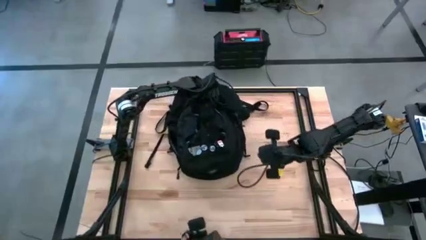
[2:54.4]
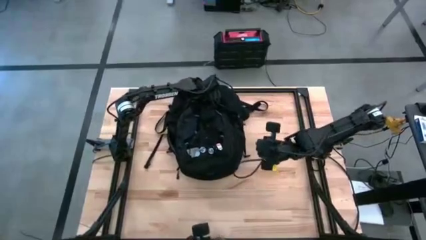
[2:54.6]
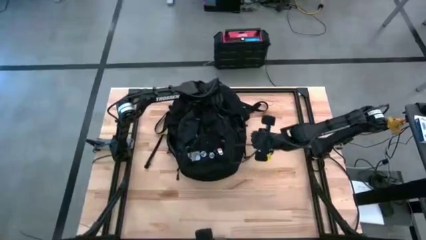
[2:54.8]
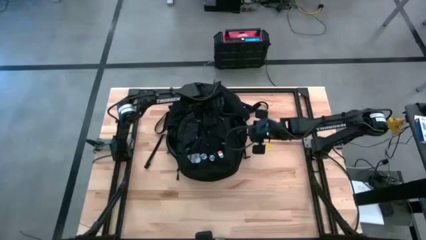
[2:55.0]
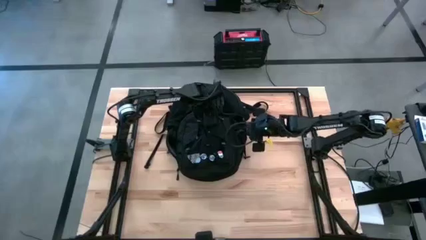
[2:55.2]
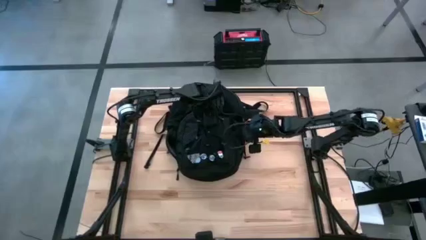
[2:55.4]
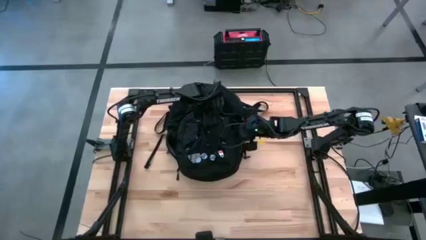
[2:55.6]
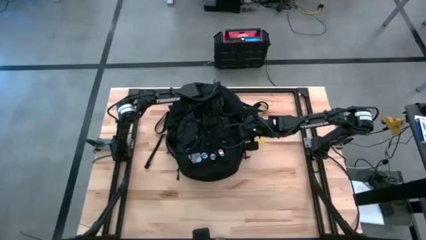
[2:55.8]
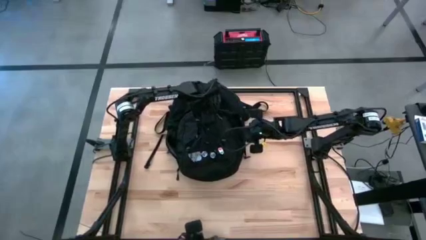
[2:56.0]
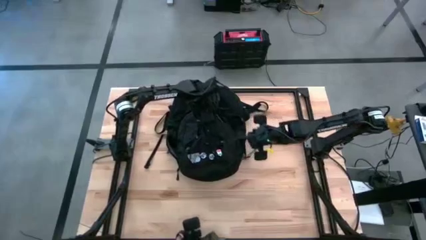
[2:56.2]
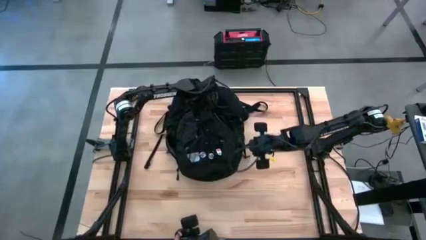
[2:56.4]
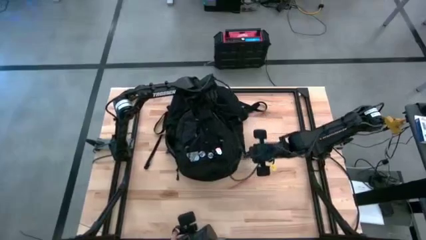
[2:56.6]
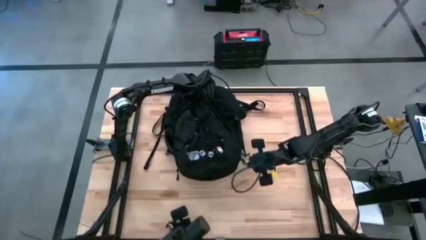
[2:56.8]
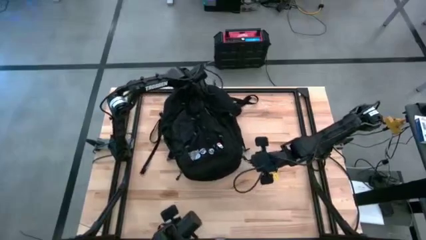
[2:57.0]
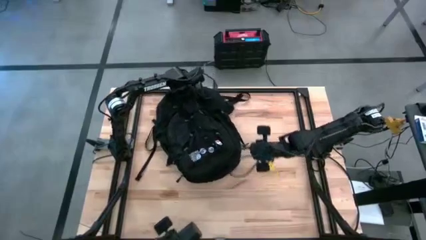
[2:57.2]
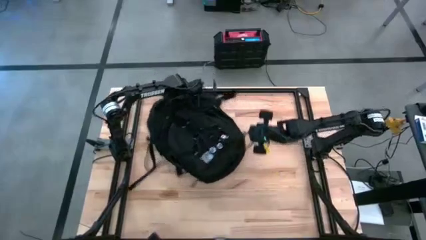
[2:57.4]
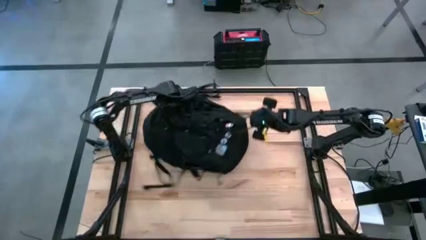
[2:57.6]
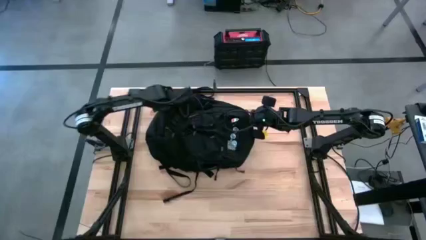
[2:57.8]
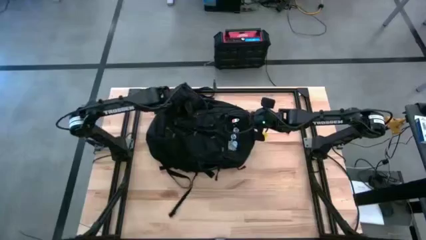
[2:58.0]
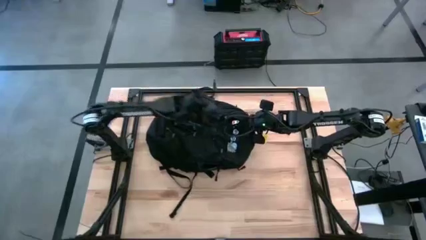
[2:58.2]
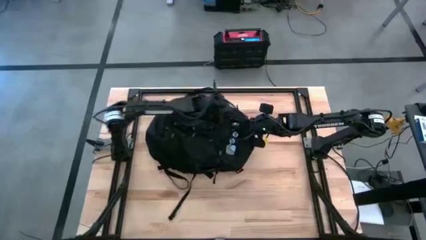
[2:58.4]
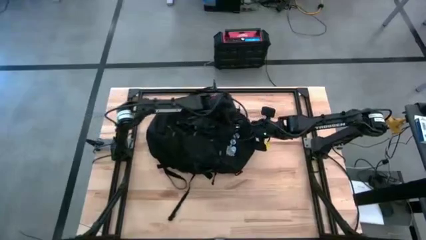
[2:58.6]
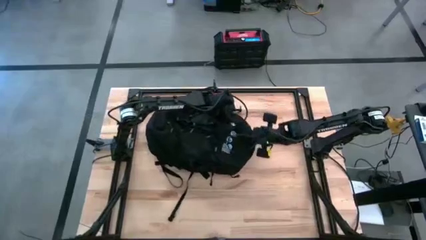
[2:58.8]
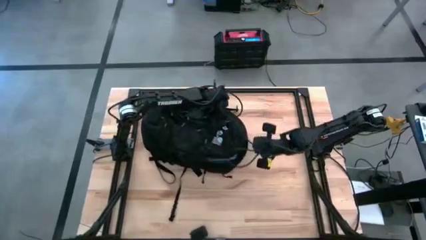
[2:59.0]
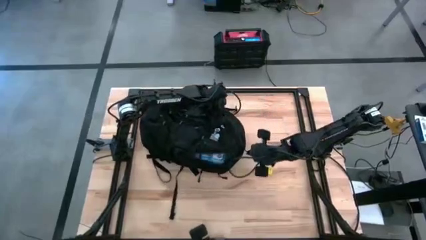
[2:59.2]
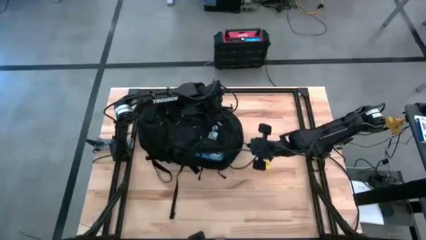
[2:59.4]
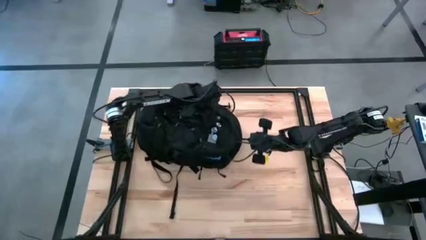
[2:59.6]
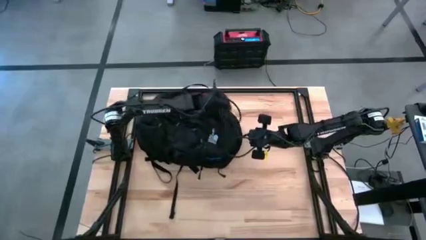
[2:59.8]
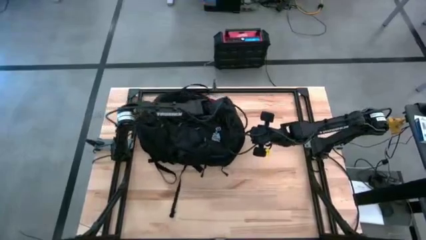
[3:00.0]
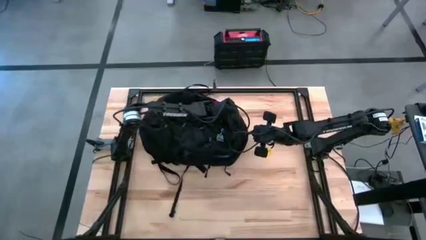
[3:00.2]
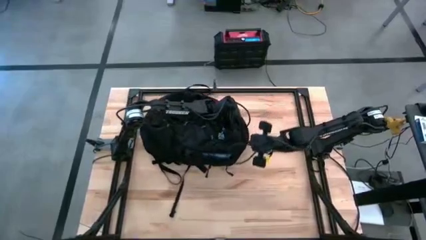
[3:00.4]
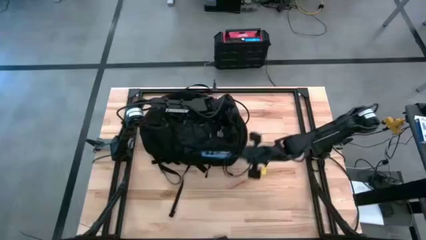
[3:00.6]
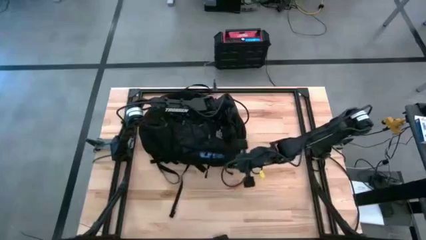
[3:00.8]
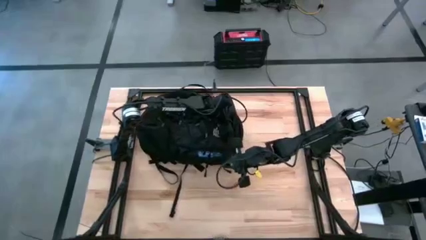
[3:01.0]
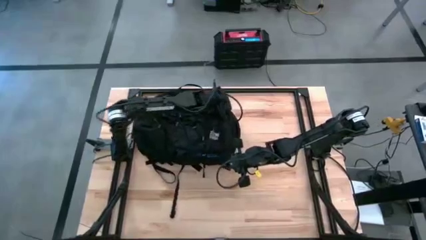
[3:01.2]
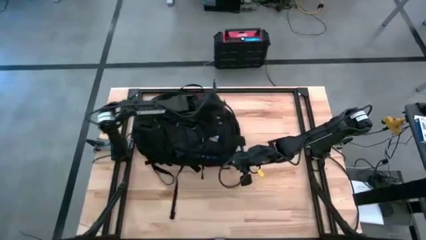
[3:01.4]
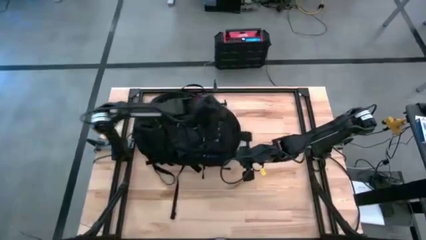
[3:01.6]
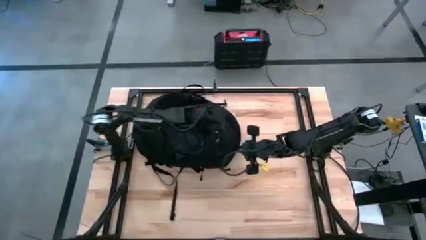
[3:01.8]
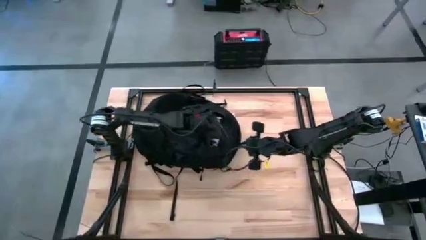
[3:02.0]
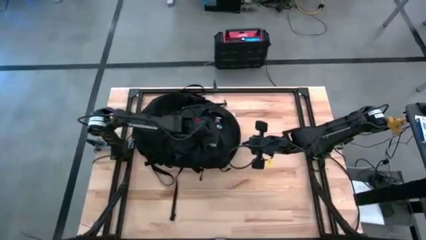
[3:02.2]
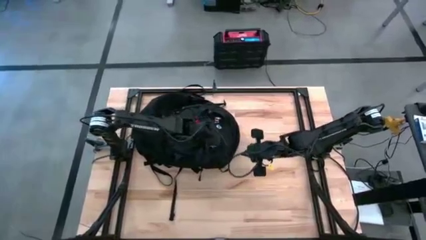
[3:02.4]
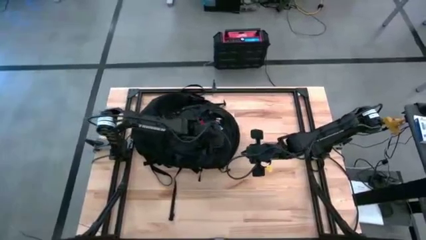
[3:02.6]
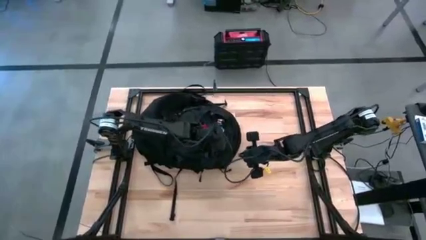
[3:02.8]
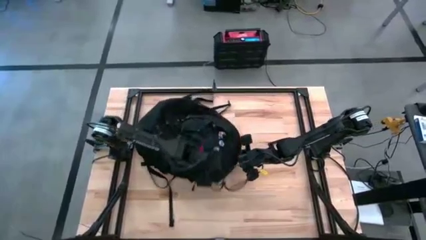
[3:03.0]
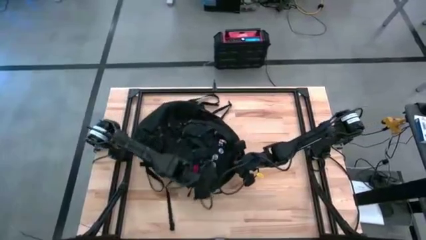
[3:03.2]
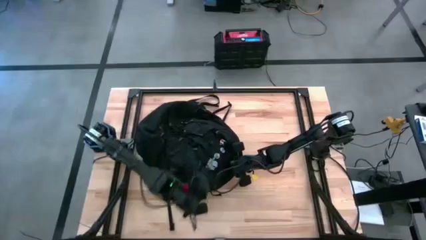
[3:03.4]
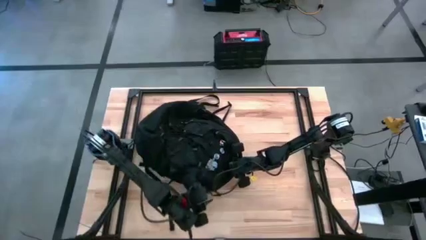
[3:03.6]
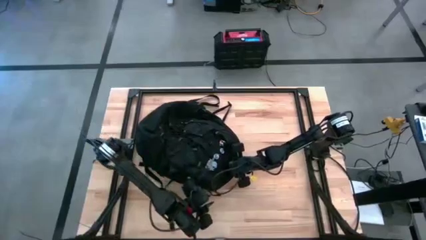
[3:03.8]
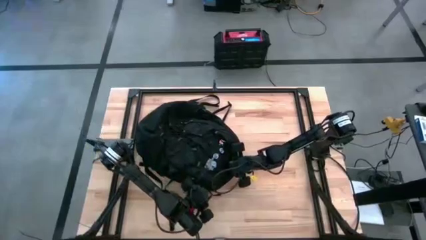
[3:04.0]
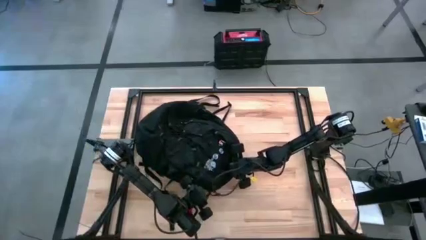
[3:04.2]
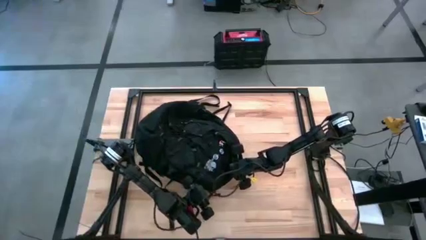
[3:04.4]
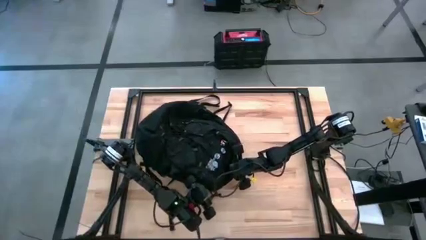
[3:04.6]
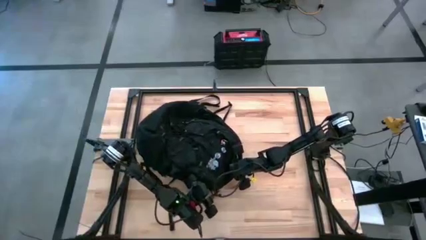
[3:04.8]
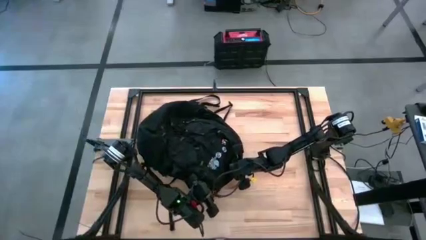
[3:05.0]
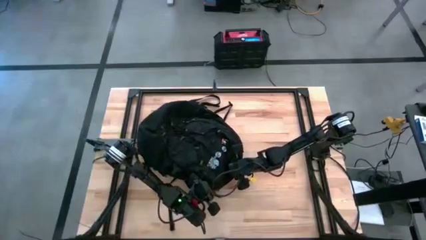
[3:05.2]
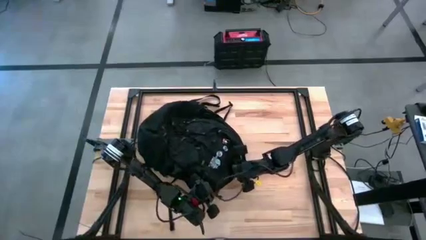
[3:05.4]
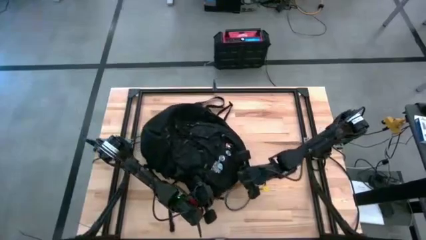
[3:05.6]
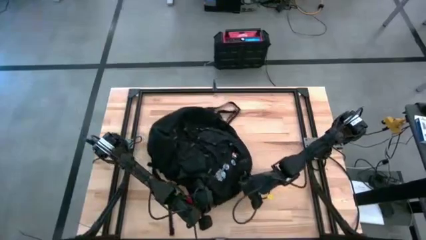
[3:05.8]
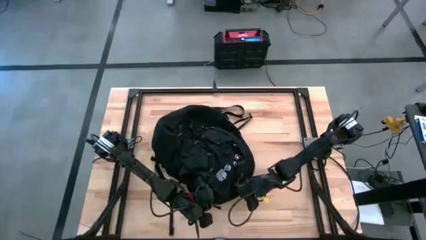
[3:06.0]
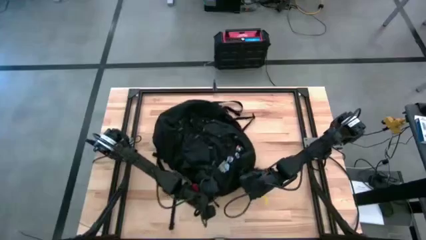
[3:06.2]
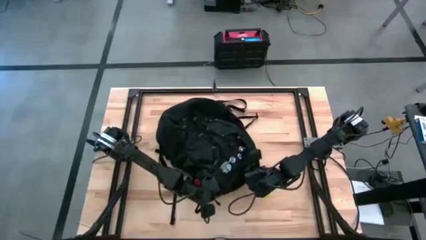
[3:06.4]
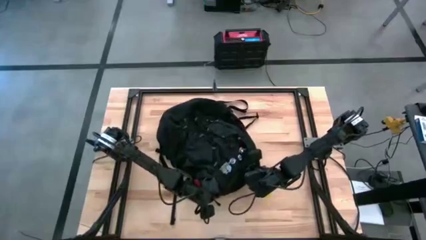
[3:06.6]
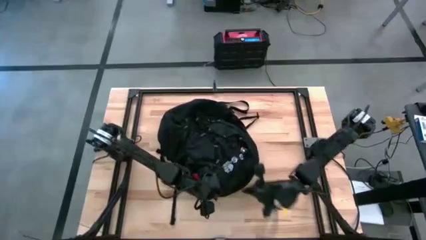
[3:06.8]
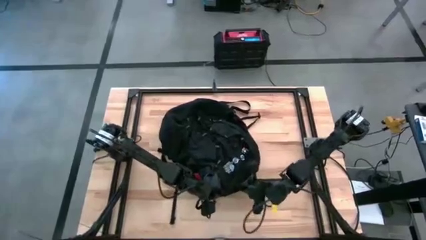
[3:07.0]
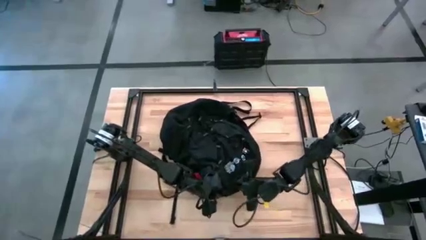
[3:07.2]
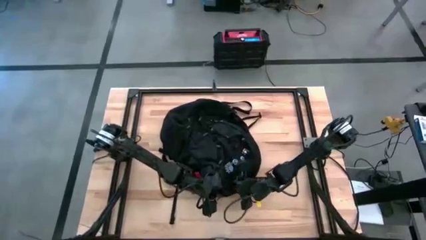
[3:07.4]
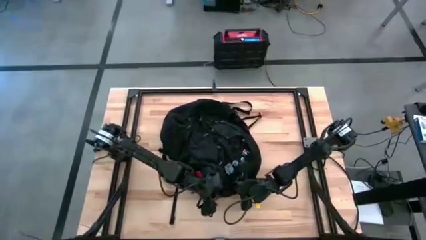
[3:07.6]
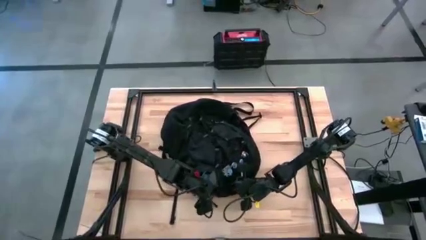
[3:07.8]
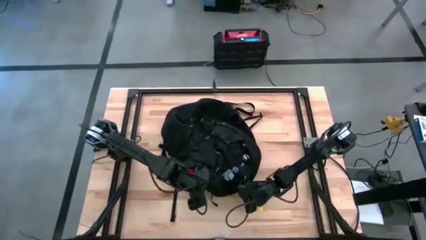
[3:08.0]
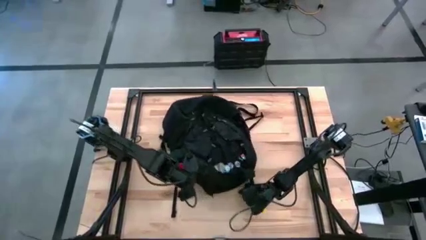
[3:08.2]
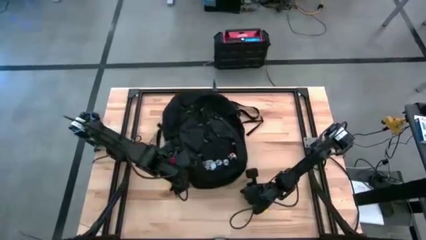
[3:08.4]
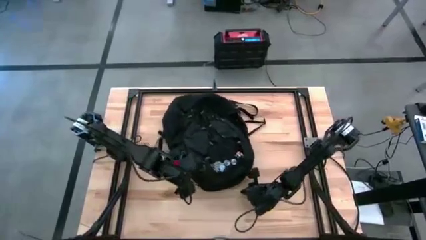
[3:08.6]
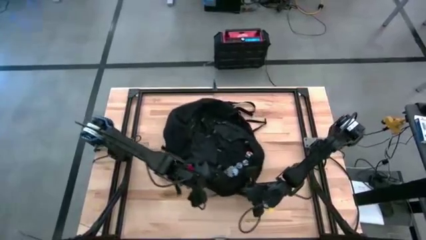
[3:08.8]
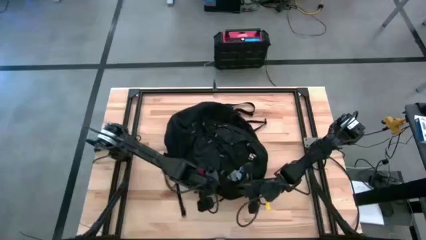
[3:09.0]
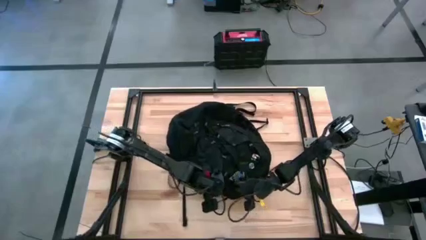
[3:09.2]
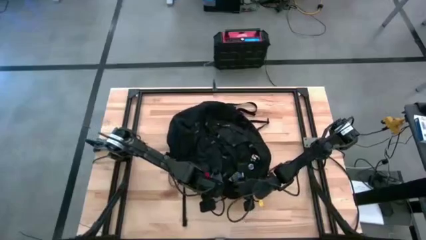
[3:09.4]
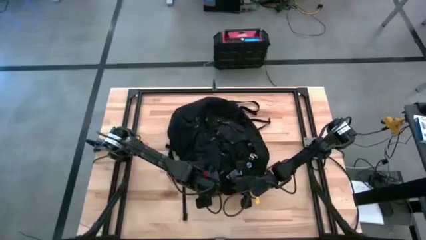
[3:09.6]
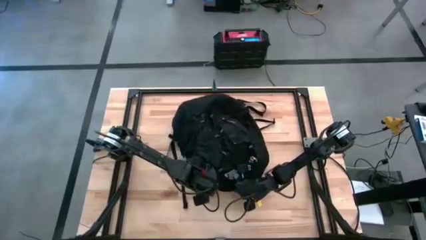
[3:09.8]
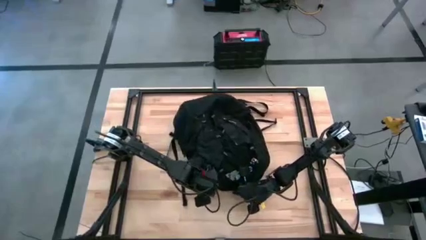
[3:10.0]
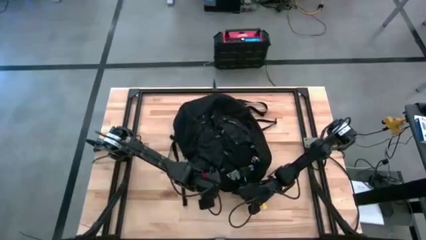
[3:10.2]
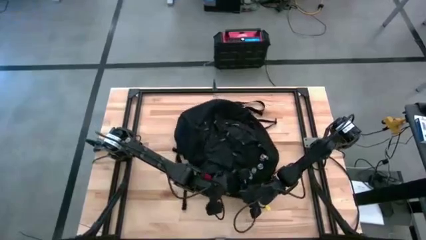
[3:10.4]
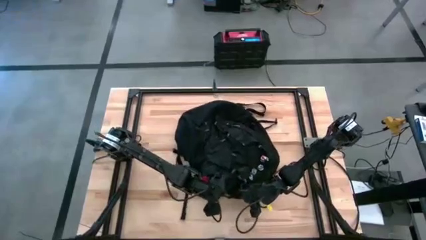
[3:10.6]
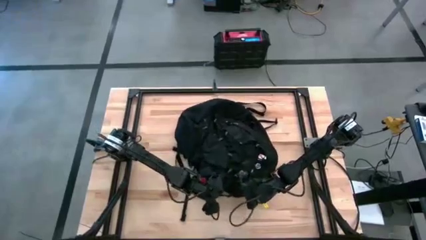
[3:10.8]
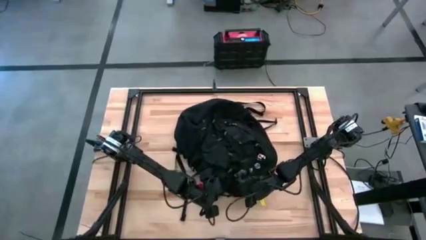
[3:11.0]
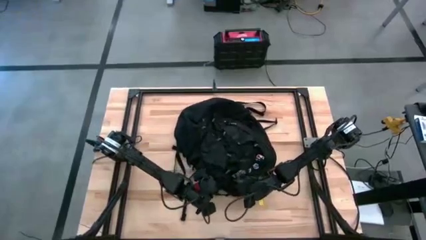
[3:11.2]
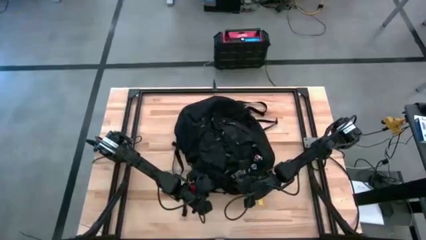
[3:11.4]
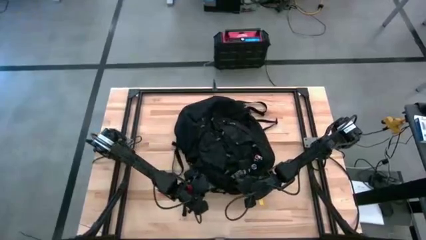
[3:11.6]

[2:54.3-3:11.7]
Task: Unpack backpack
Close the black backpack
